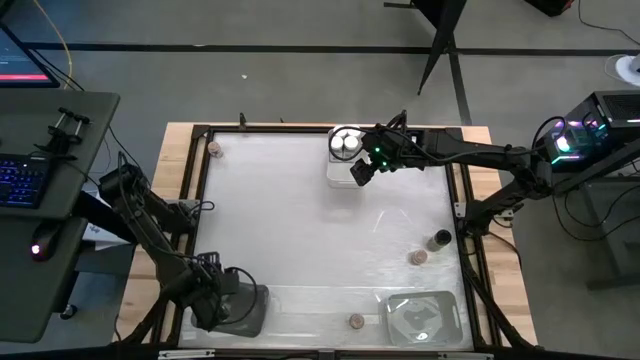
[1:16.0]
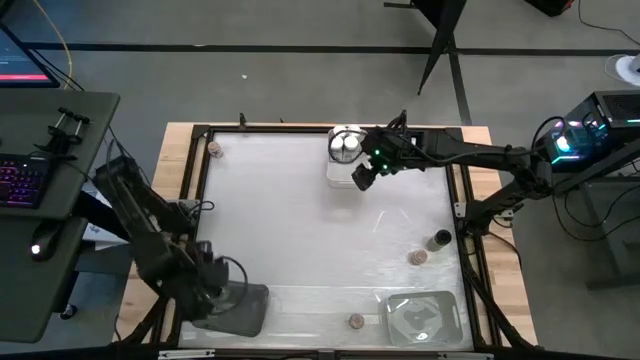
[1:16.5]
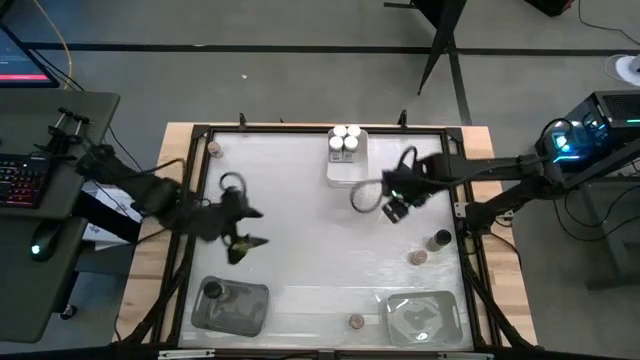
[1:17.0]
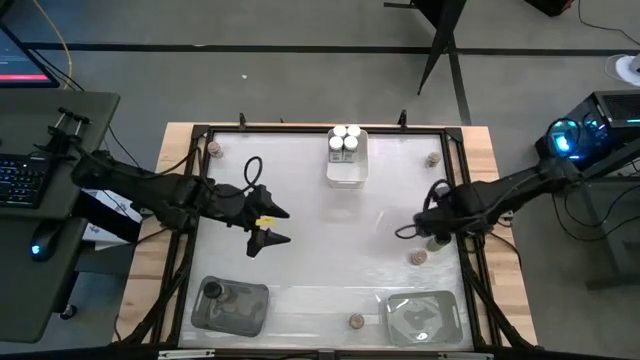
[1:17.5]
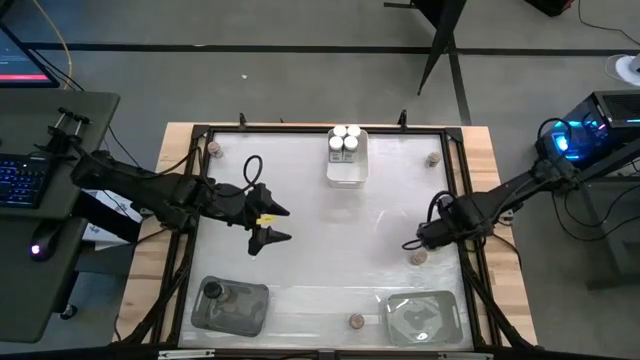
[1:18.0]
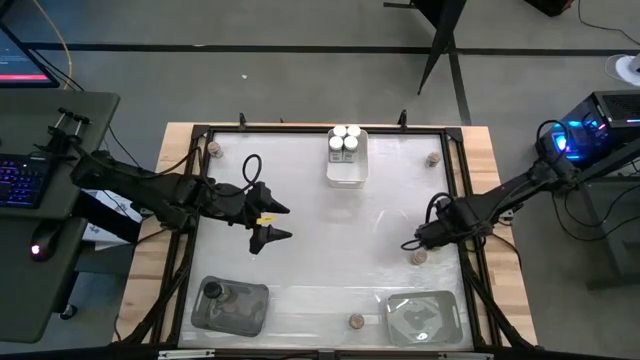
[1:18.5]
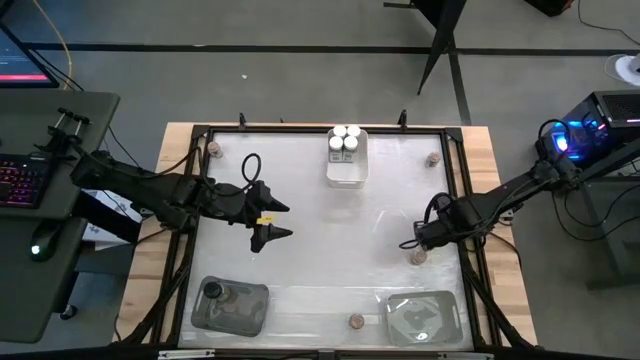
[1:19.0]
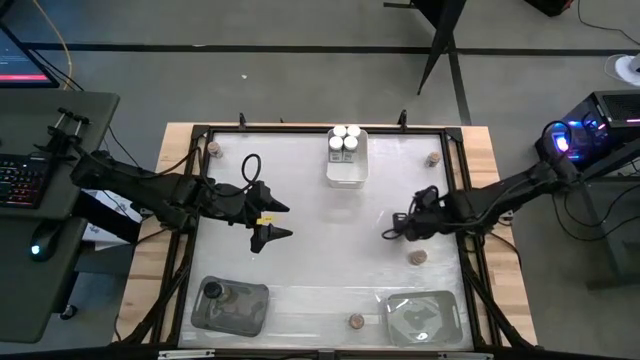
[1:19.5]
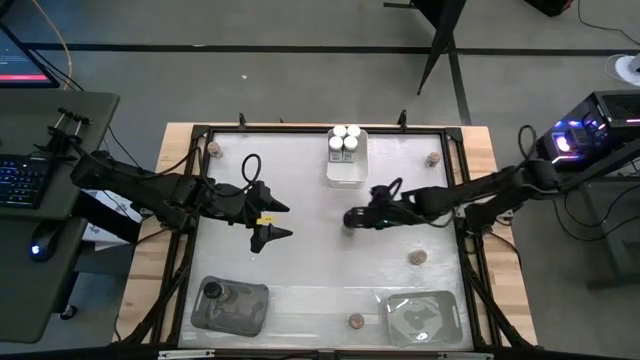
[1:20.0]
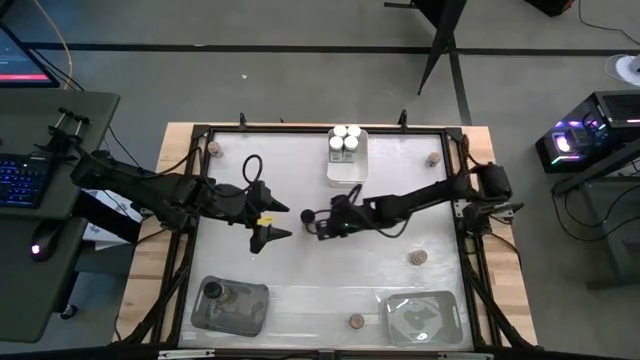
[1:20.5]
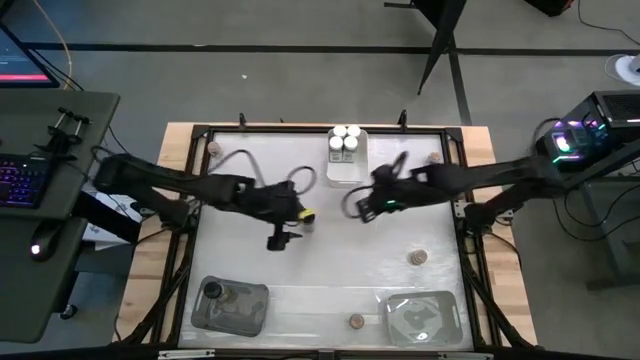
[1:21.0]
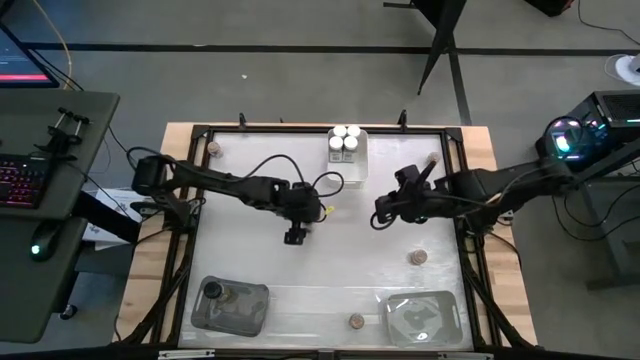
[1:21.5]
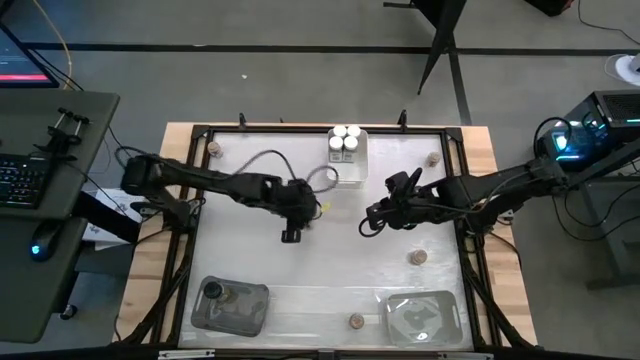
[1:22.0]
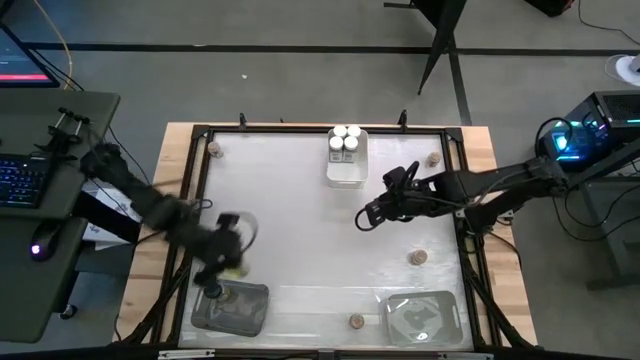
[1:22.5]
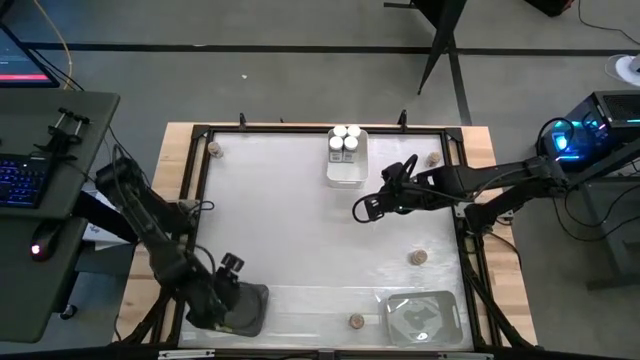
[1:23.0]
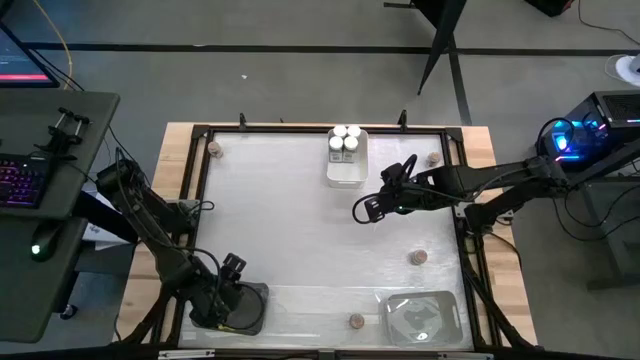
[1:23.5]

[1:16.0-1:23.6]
Task: Sort spices by type
Put the black seasoning bottle into the black bin

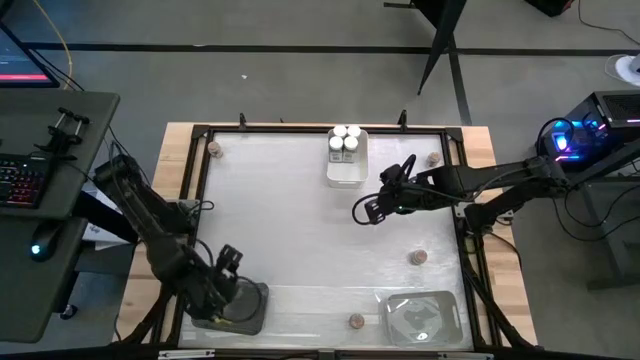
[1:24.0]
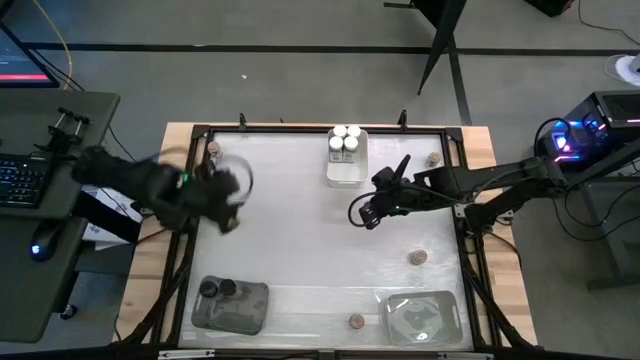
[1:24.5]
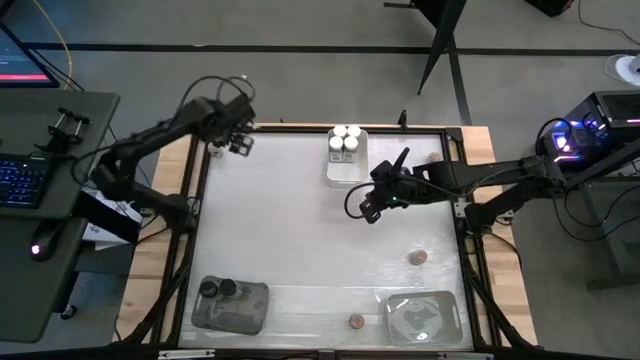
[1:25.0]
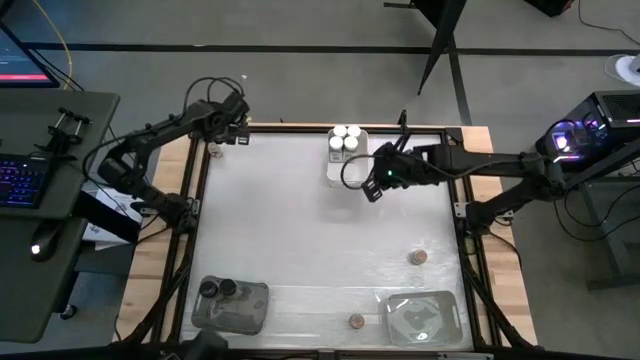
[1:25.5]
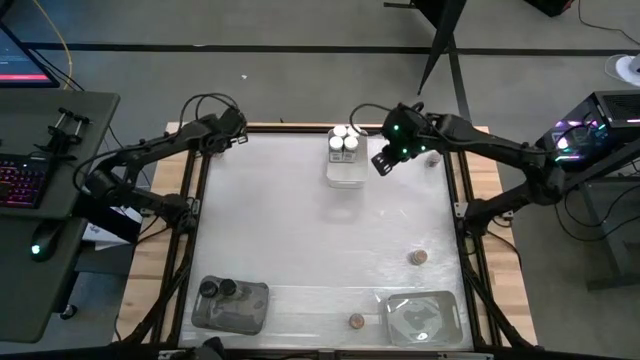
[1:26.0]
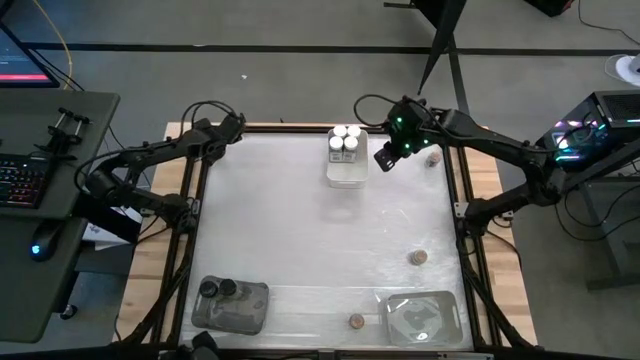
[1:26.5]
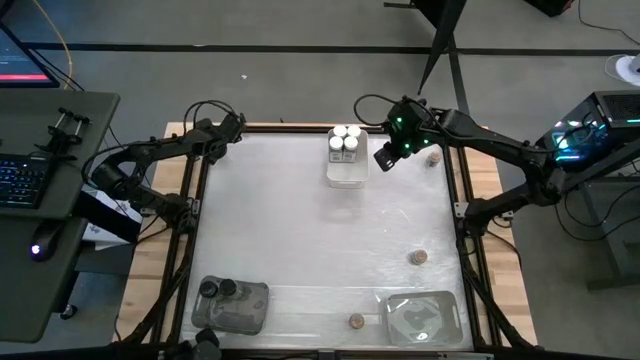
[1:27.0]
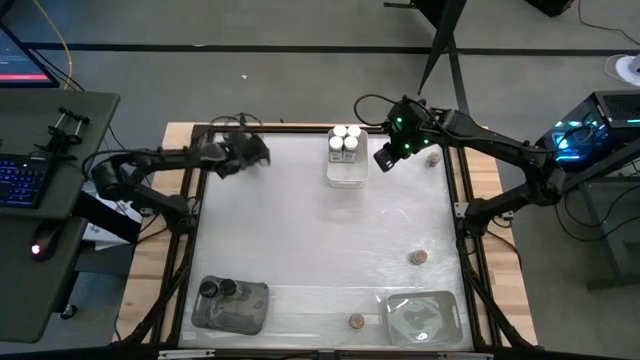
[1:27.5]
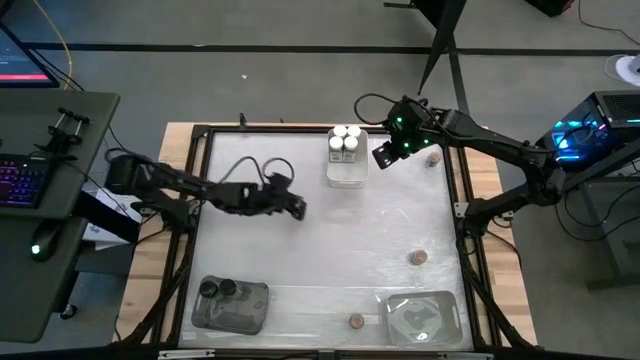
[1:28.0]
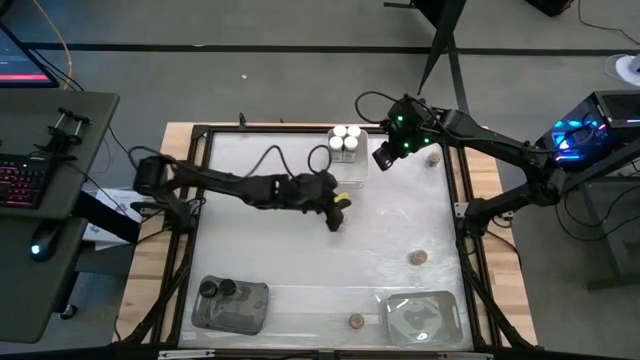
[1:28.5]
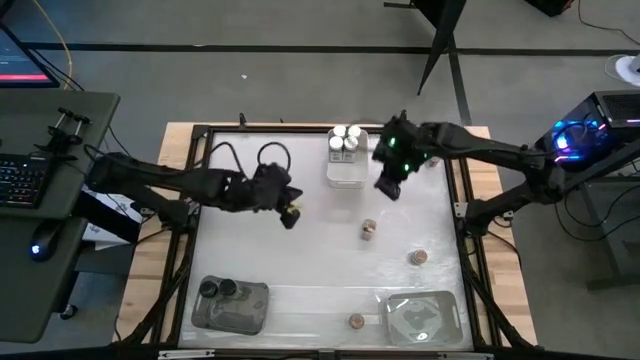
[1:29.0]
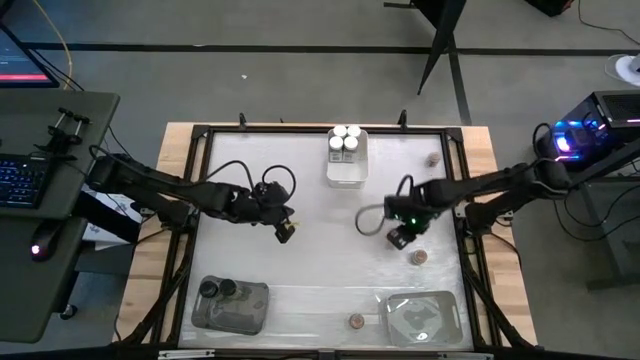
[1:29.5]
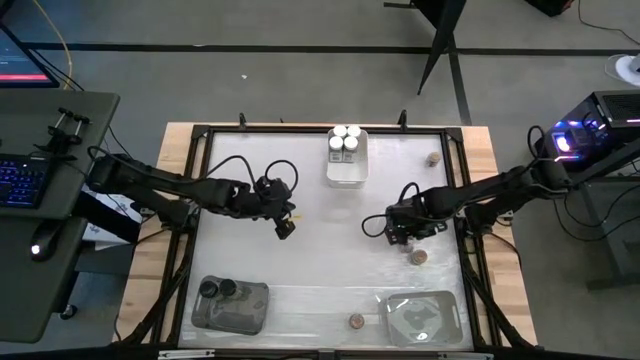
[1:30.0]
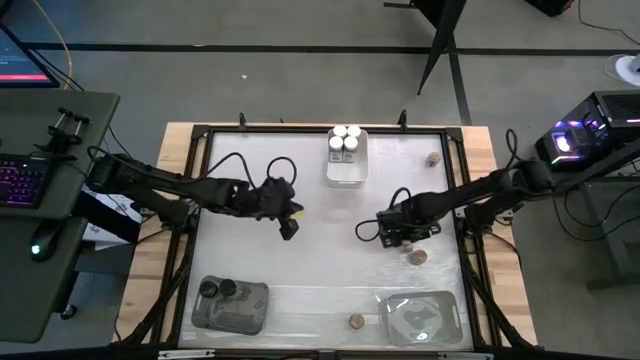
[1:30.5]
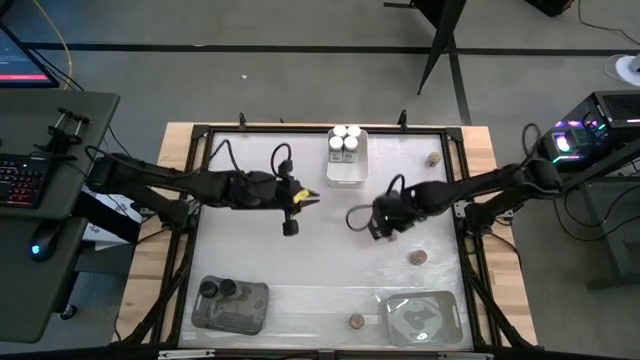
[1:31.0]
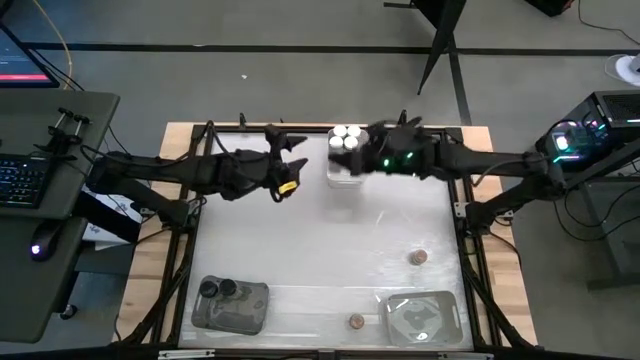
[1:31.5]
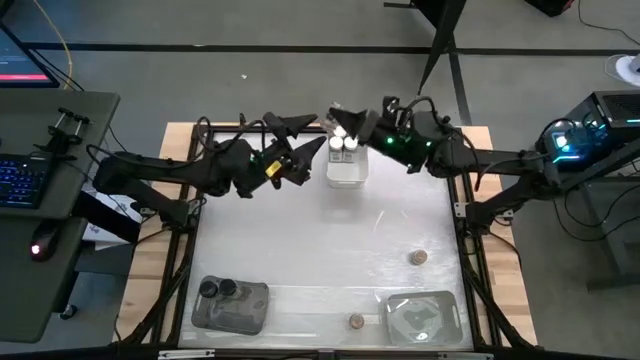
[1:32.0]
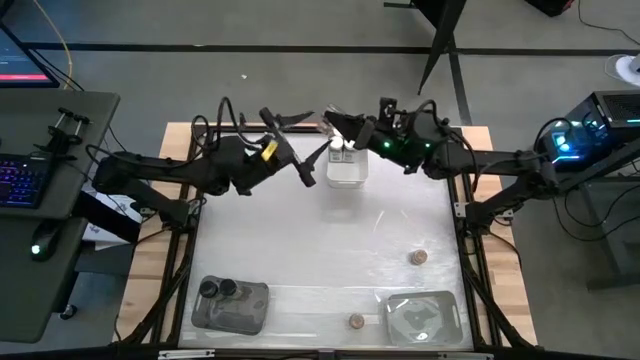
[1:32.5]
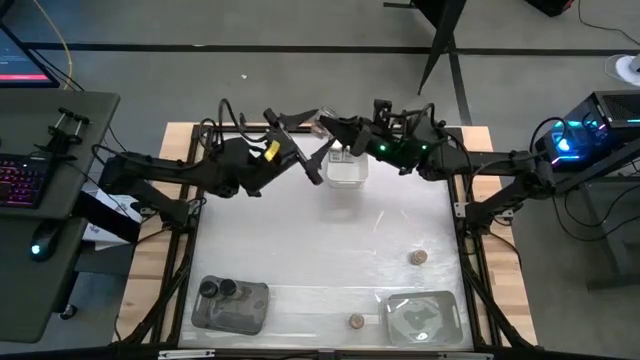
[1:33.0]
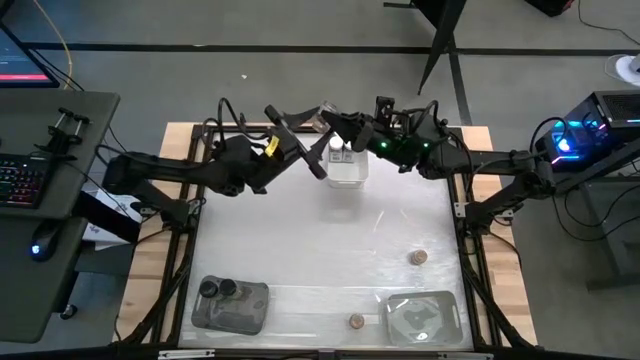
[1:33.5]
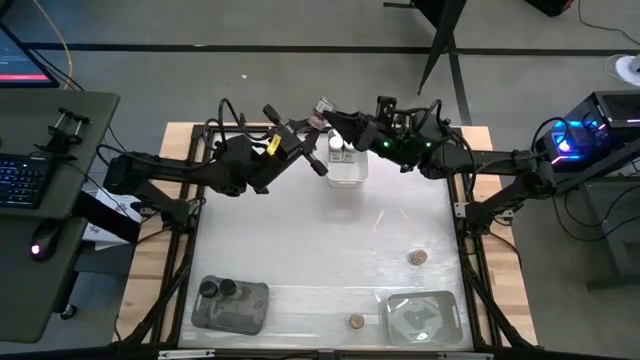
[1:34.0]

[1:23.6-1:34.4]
Put the top left brown seasoning bottle into the gray bin

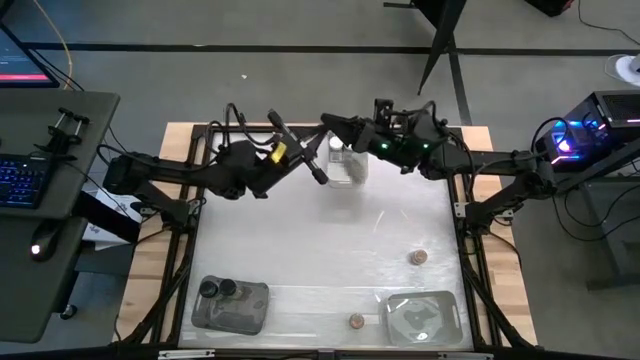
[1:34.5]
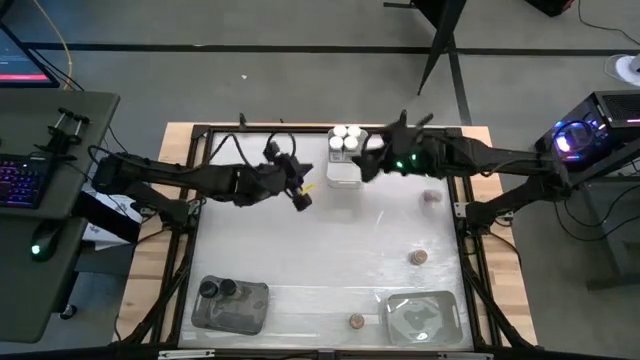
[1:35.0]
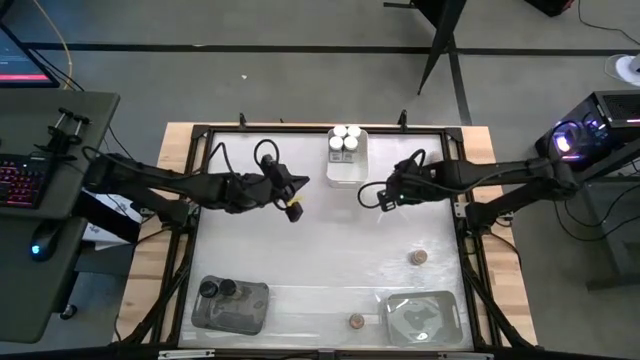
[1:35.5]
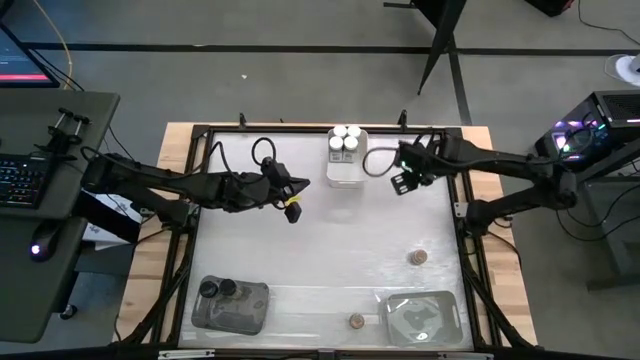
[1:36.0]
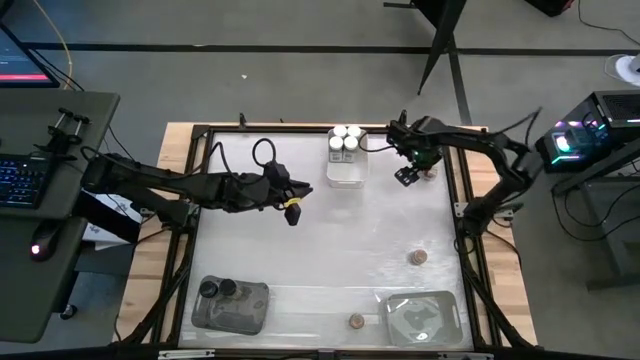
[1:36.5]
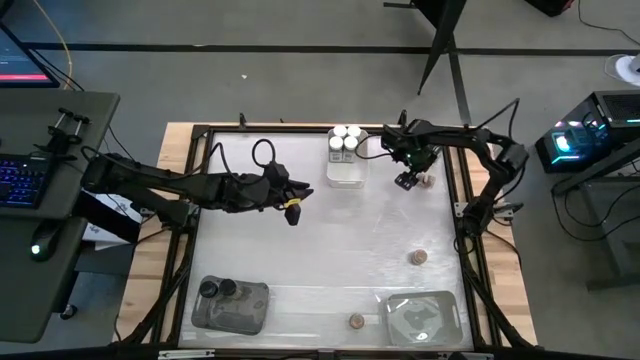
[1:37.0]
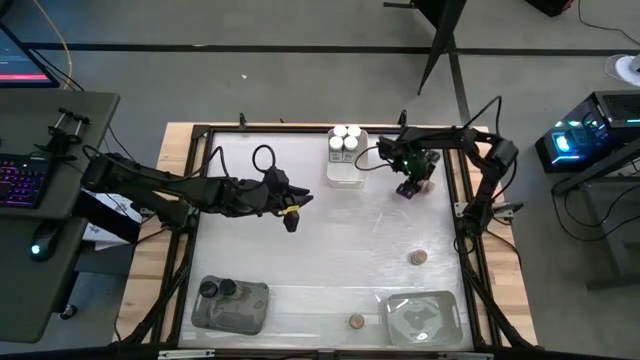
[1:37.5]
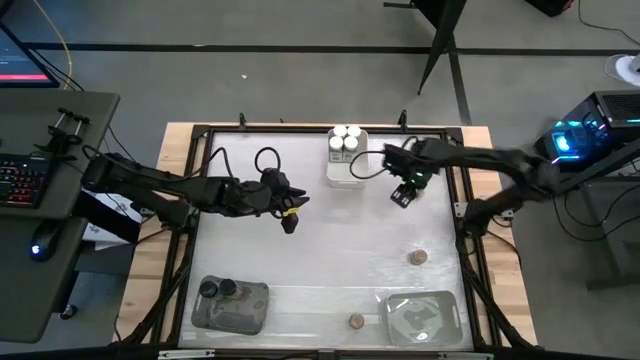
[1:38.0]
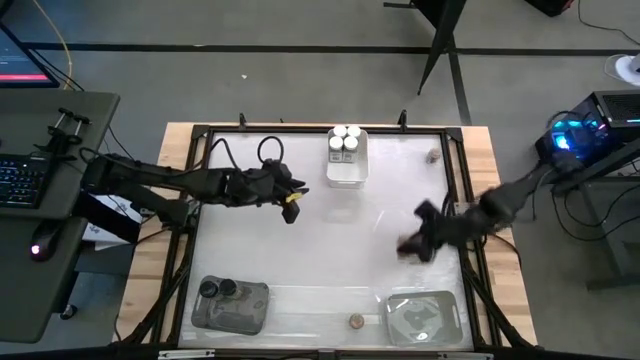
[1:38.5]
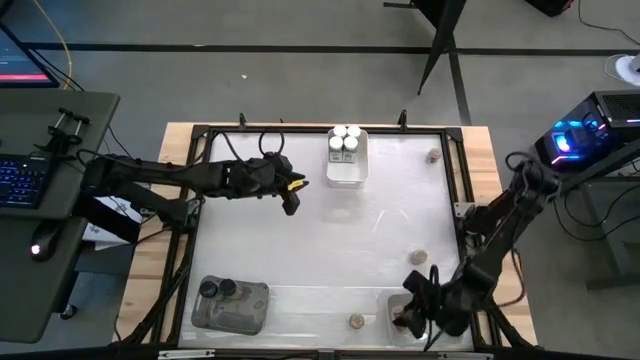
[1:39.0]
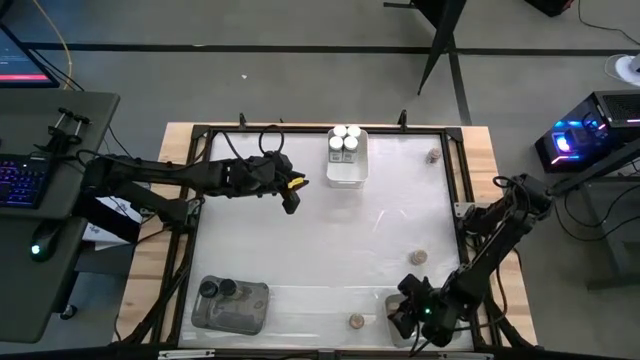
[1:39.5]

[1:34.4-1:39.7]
Put the top middle brown seasoning bottle into the gray bin
